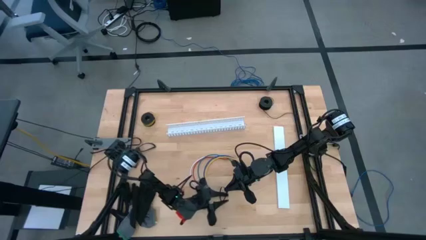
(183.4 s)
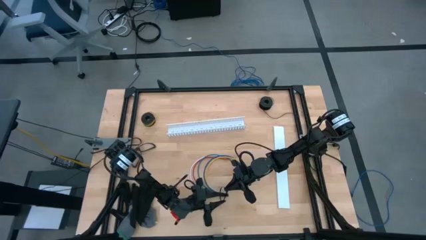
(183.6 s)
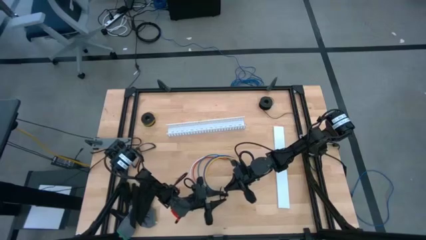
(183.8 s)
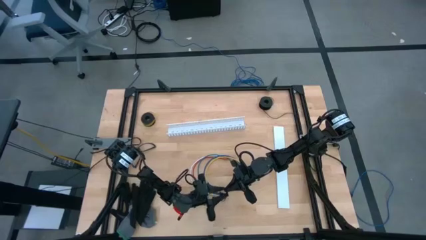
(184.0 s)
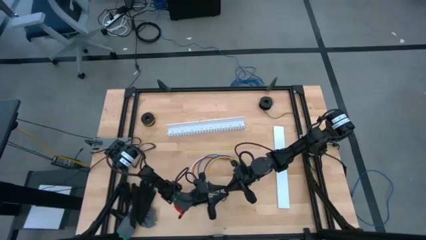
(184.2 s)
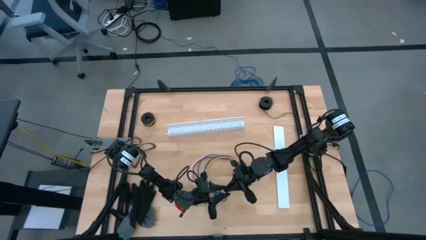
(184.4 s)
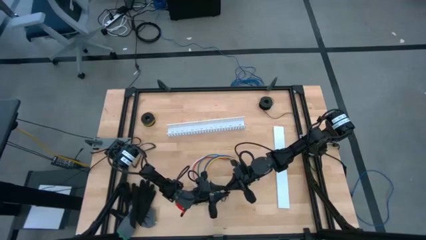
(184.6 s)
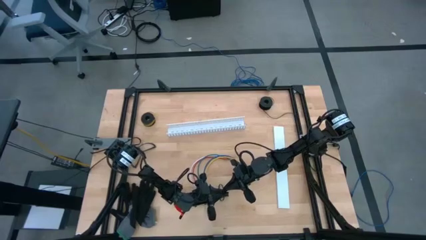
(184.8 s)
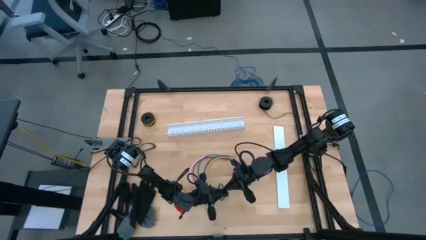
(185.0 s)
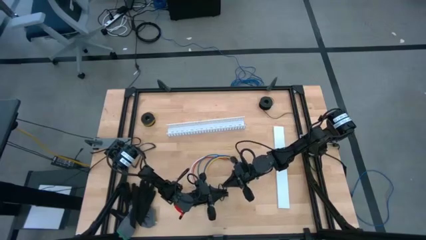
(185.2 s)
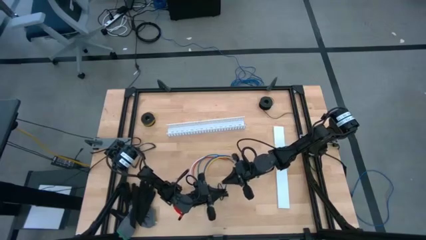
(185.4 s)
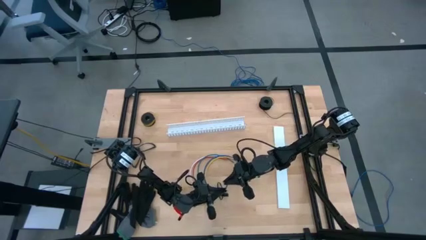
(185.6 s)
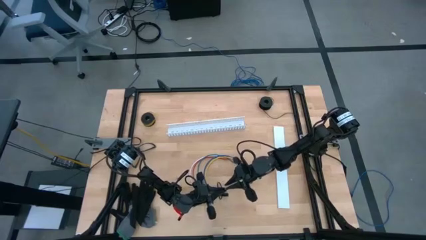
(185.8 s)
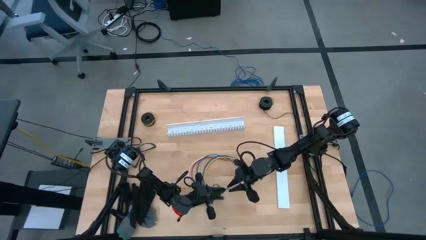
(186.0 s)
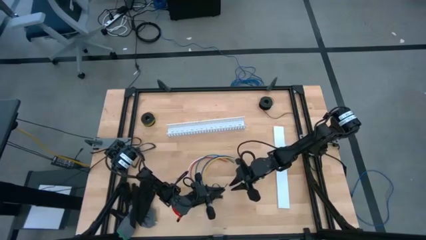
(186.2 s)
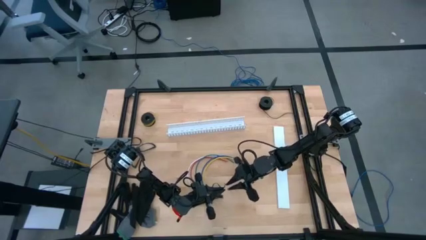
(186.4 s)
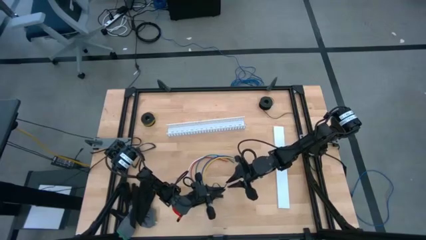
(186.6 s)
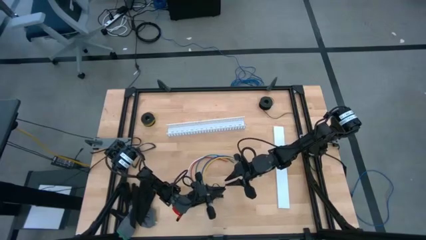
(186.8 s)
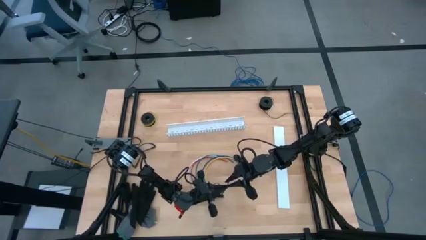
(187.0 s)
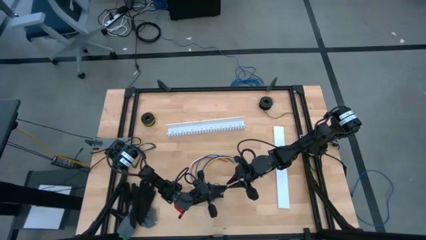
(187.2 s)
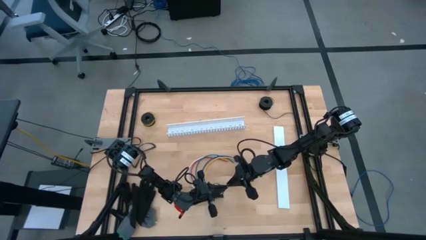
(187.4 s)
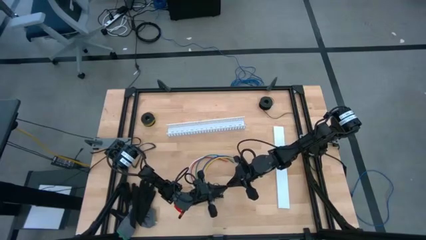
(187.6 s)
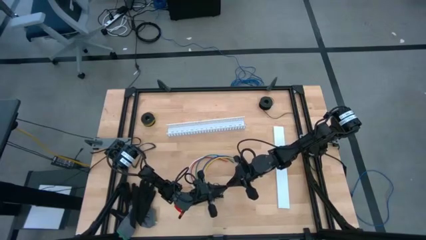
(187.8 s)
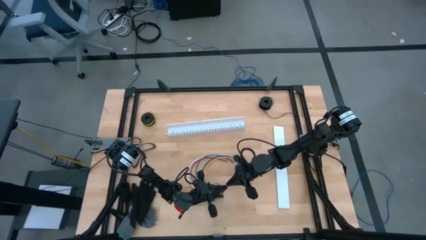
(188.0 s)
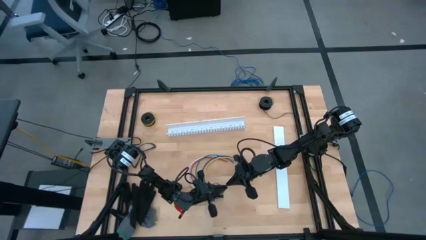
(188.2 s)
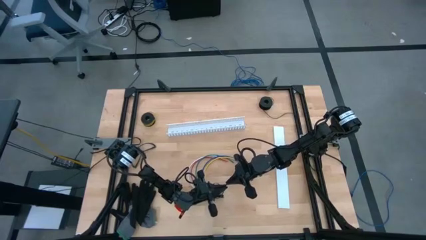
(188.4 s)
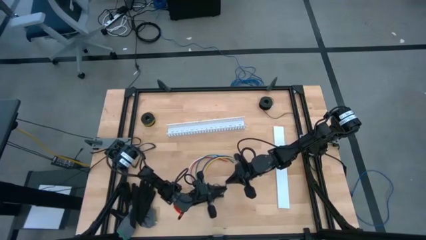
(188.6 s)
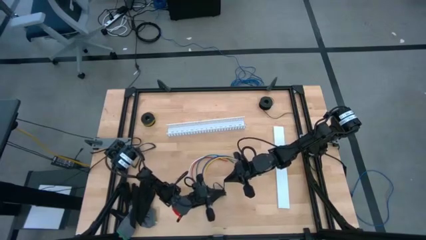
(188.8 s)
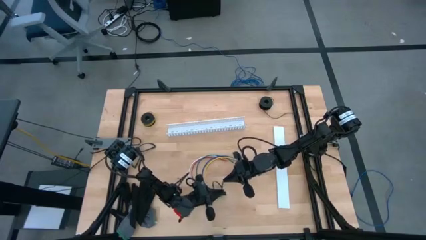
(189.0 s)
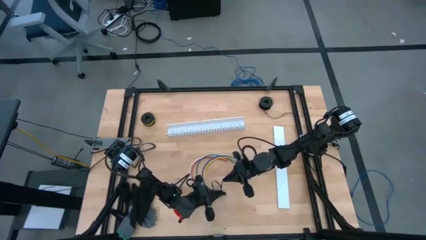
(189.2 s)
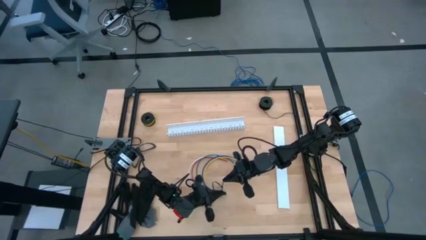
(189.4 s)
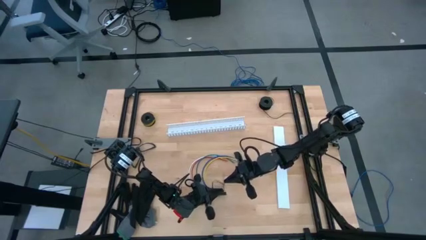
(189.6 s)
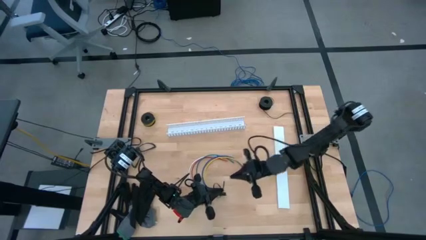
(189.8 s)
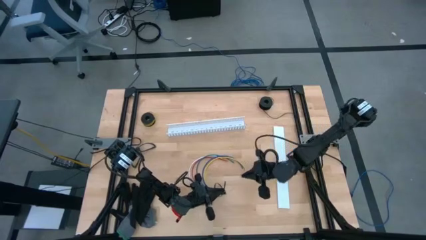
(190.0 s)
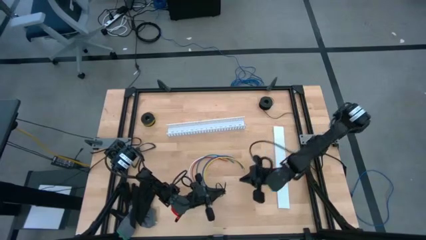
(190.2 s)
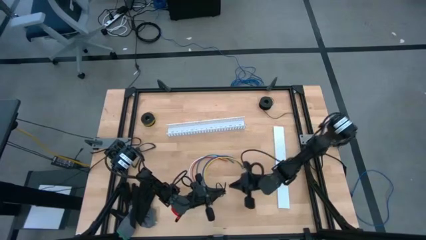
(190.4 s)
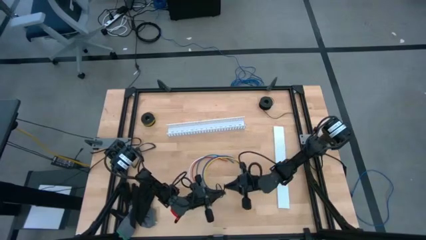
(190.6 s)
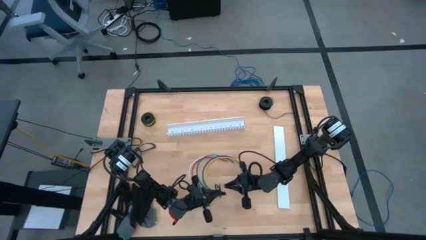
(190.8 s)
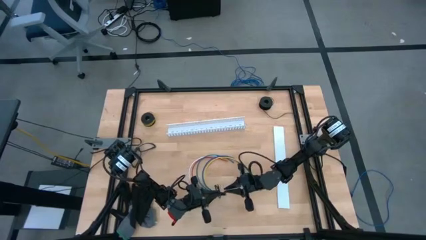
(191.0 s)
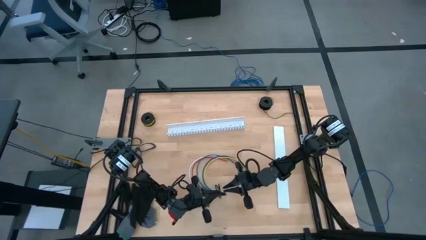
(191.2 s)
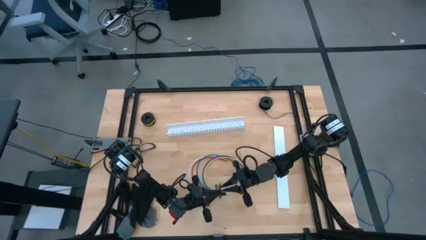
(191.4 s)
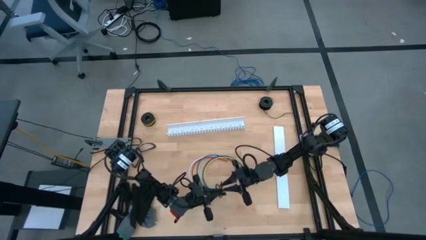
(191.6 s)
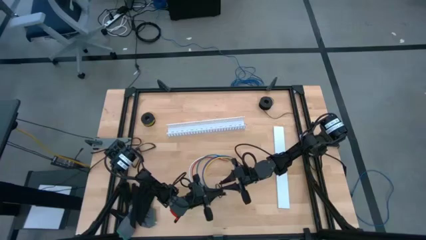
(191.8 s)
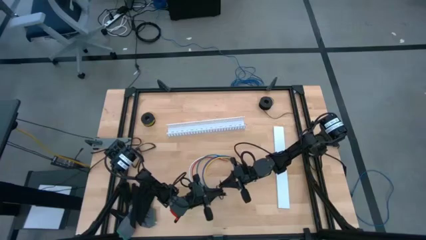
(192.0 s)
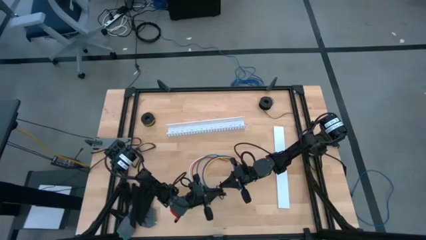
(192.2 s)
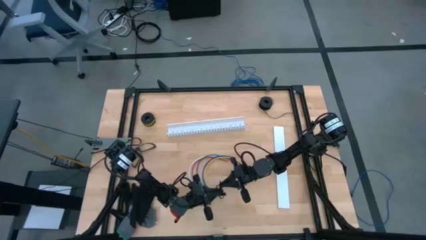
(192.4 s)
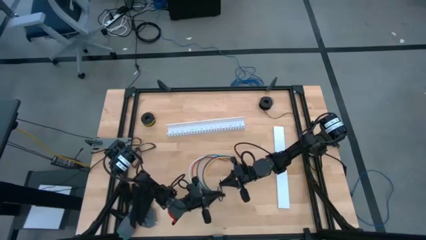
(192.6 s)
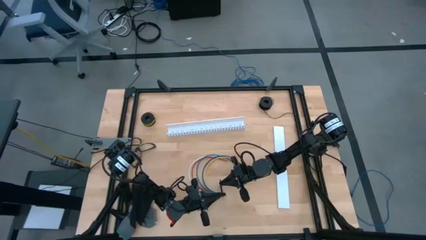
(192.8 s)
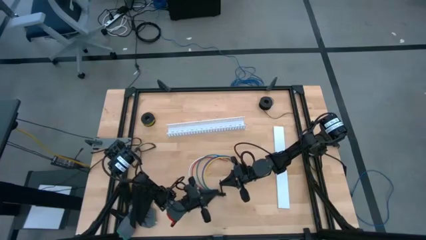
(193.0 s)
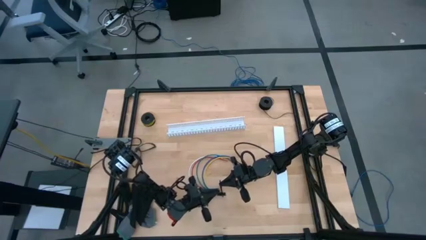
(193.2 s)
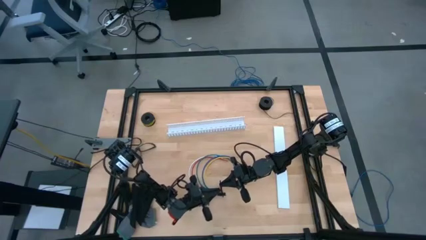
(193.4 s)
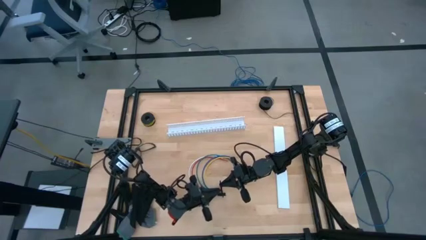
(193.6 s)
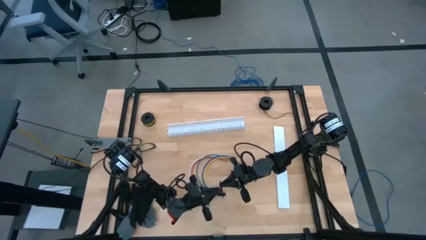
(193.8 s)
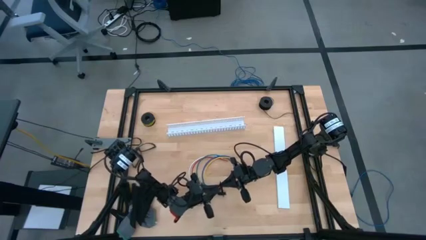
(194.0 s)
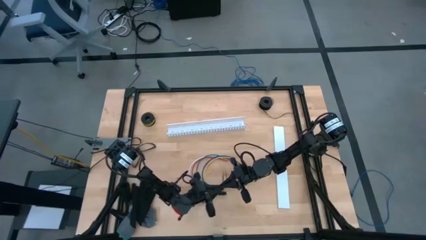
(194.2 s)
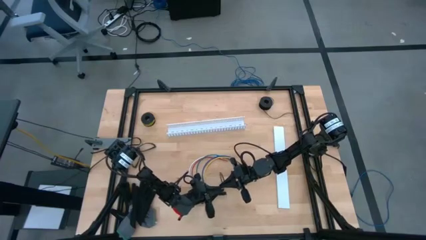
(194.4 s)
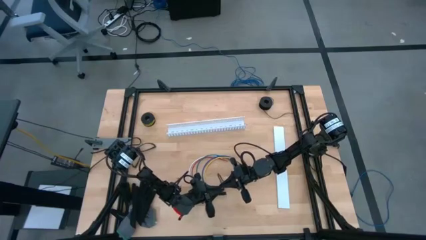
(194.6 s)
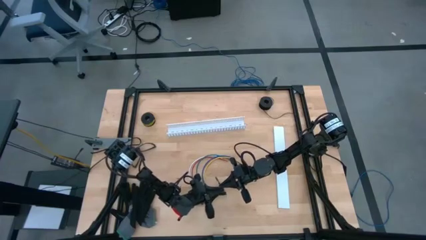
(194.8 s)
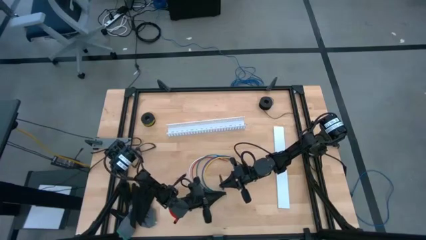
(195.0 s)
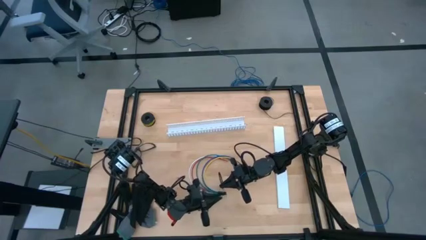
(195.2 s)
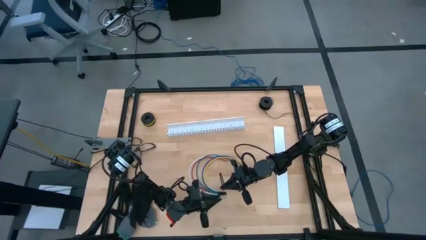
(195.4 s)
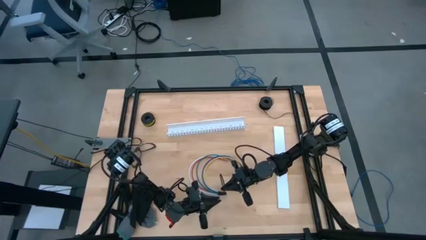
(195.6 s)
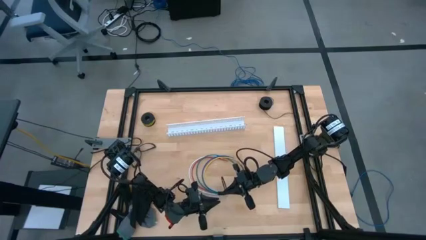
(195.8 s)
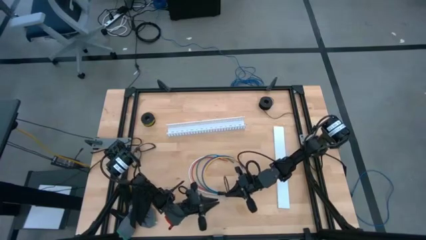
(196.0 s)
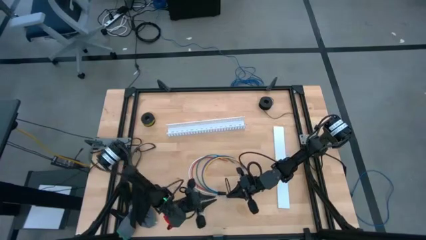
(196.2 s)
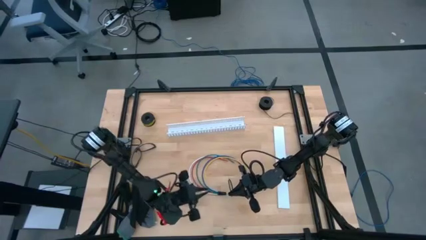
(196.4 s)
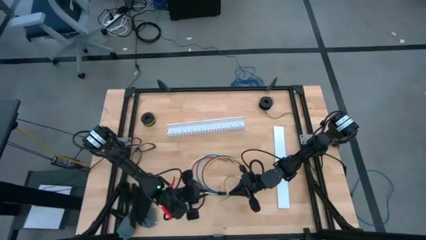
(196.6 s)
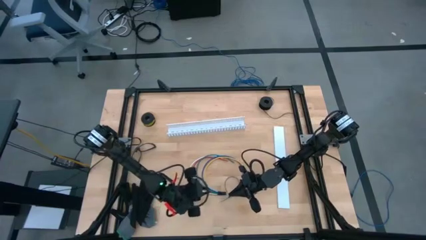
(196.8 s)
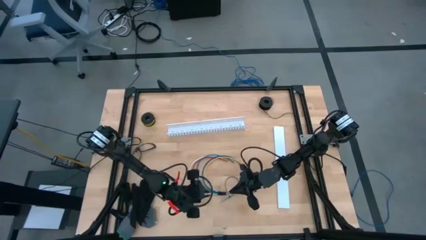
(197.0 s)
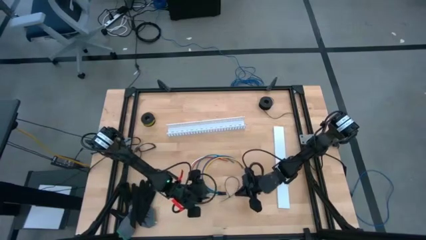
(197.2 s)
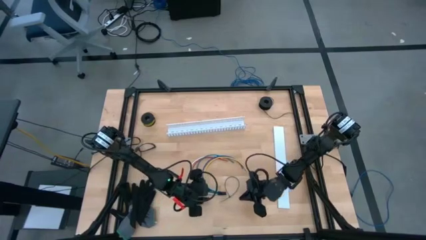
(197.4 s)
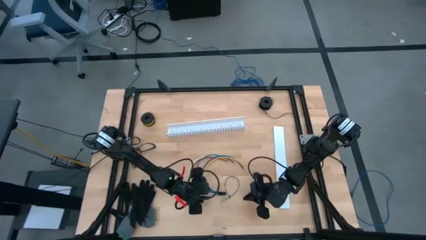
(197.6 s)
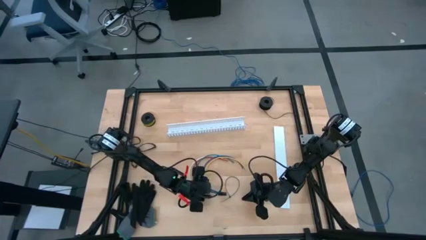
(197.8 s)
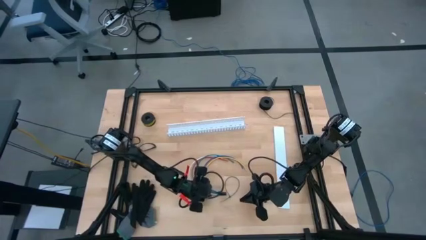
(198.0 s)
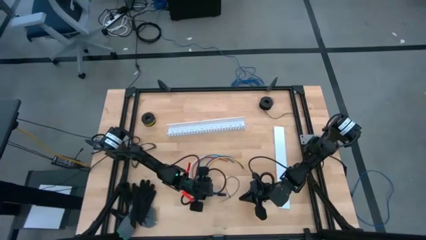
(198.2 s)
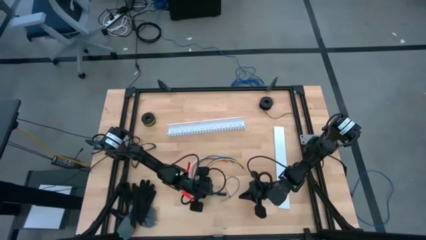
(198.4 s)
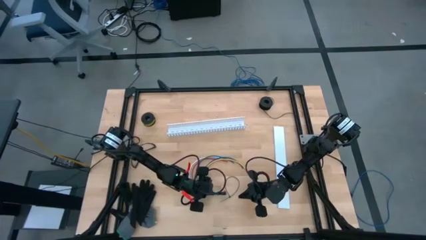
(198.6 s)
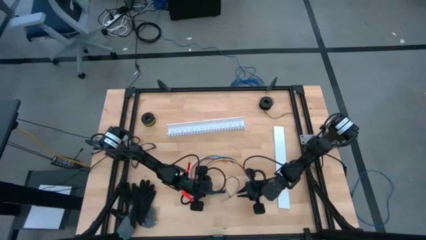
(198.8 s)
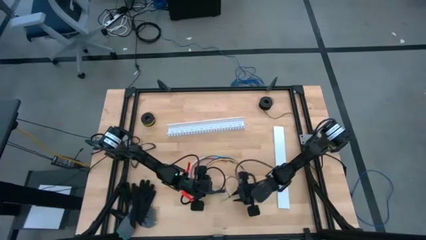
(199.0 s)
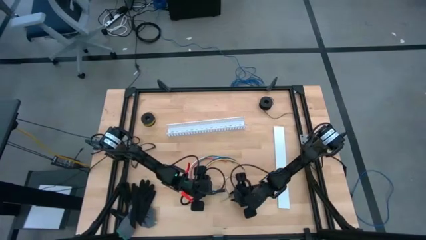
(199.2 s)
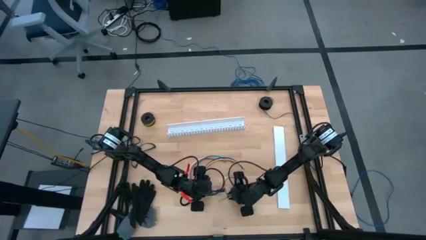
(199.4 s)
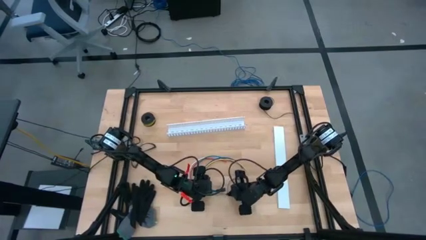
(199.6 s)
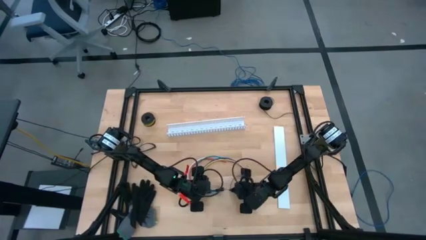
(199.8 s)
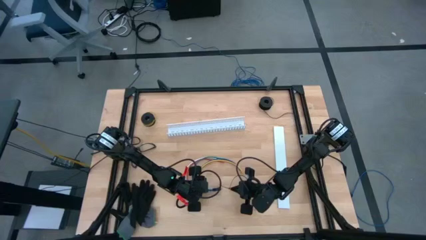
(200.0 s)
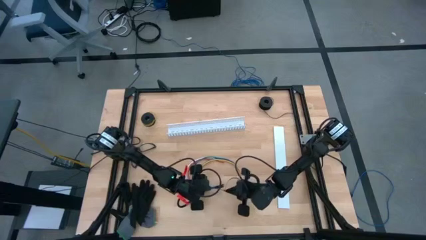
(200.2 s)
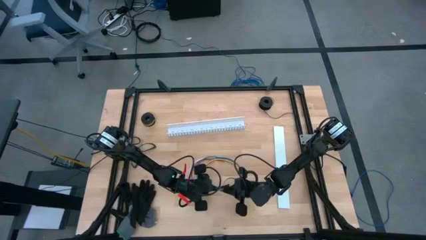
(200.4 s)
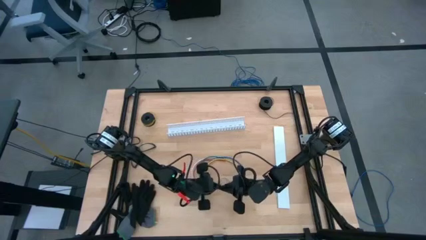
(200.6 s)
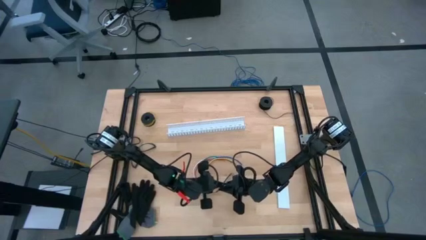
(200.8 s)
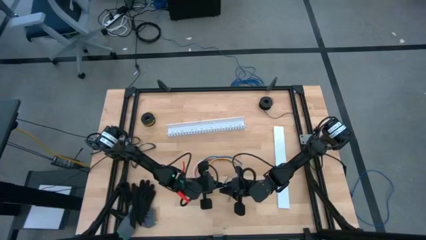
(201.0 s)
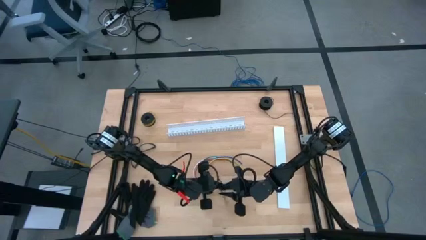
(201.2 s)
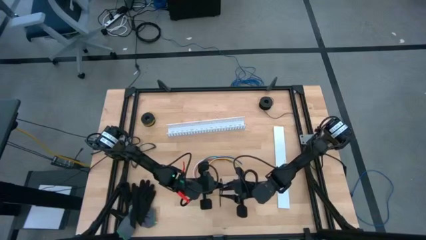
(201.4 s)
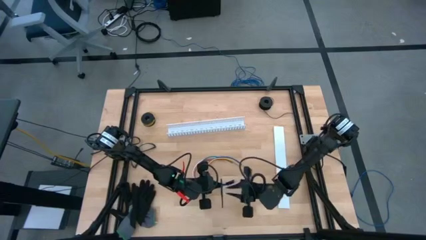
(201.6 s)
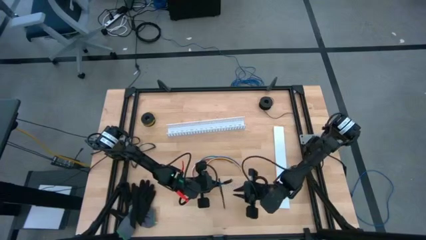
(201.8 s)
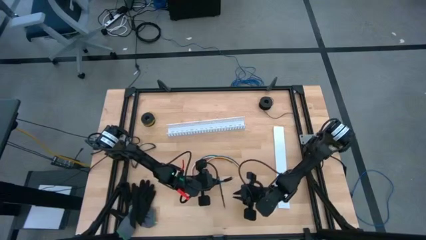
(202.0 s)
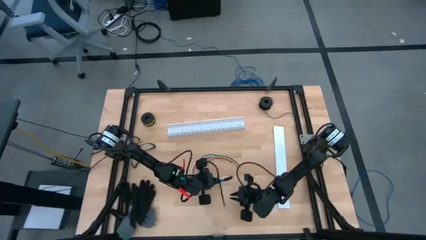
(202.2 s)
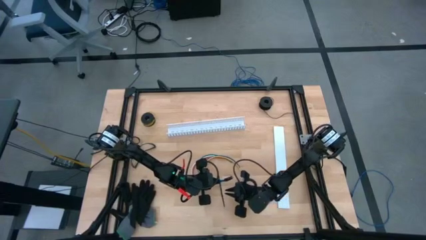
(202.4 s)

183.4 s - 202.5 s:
Task: Ziptie cables
Insert zip tie on the cable wire
